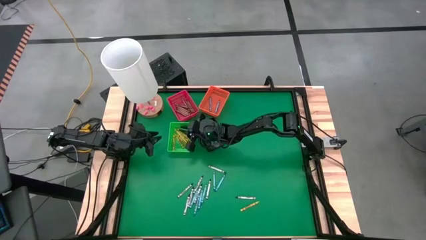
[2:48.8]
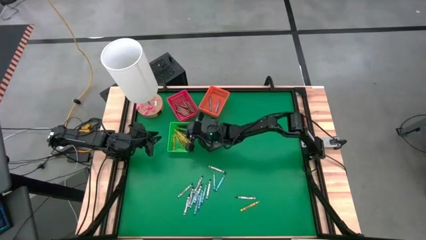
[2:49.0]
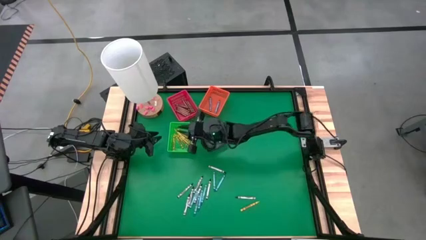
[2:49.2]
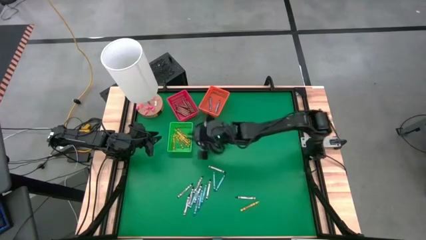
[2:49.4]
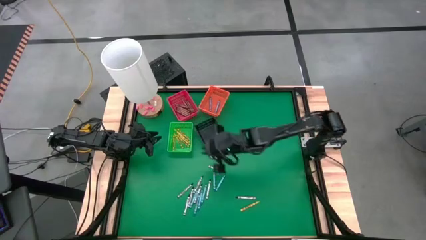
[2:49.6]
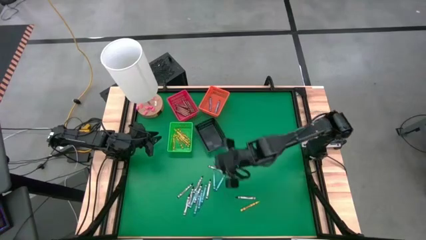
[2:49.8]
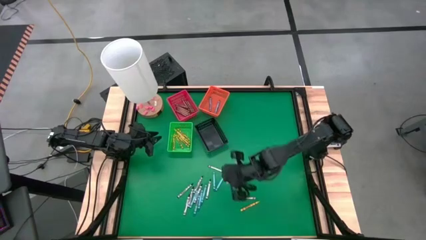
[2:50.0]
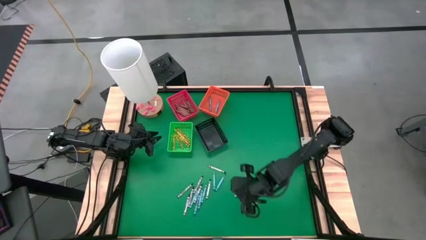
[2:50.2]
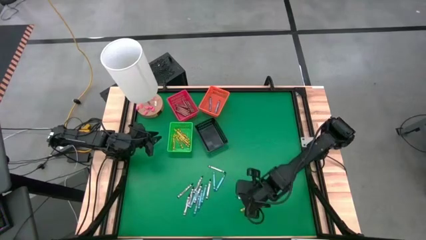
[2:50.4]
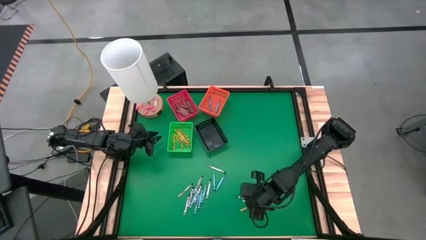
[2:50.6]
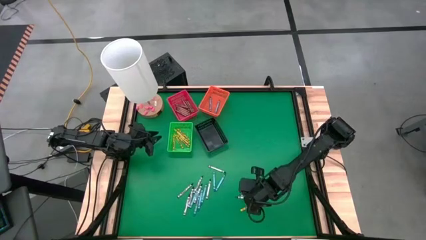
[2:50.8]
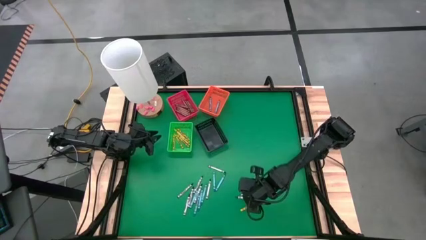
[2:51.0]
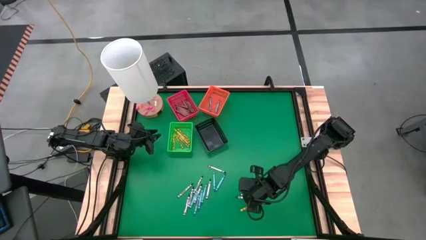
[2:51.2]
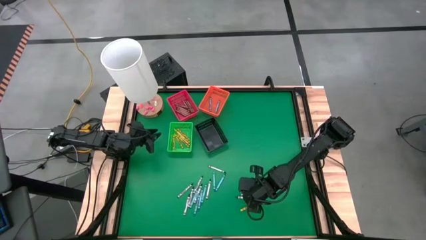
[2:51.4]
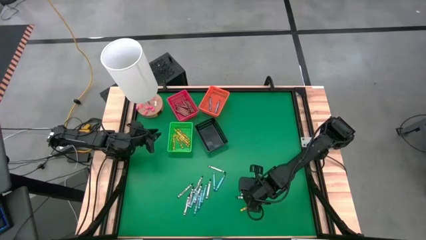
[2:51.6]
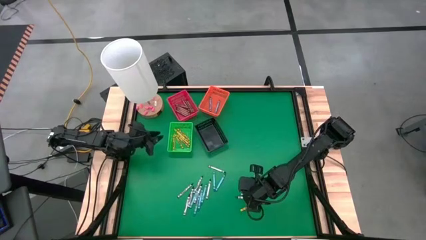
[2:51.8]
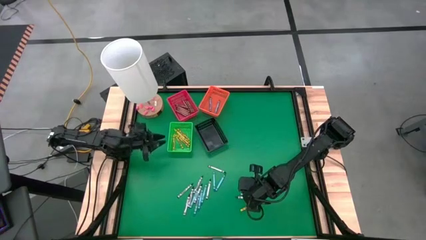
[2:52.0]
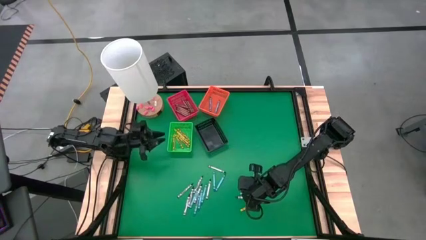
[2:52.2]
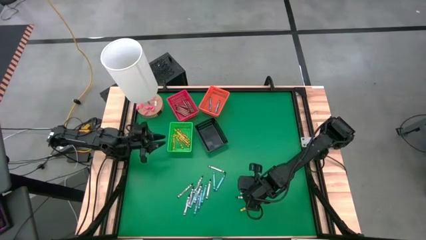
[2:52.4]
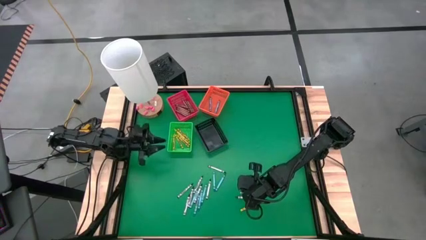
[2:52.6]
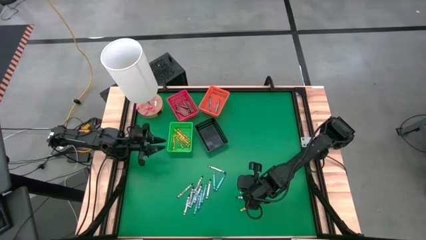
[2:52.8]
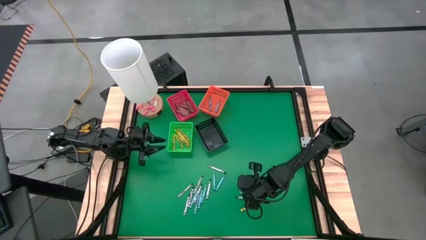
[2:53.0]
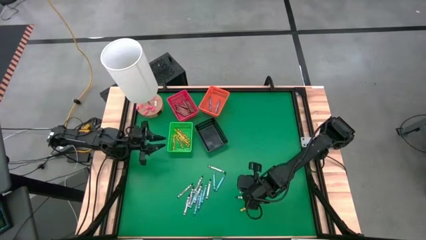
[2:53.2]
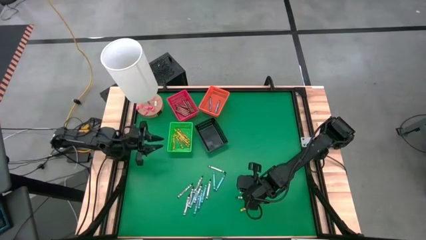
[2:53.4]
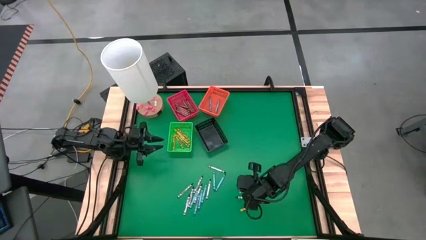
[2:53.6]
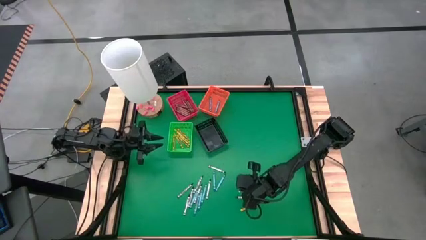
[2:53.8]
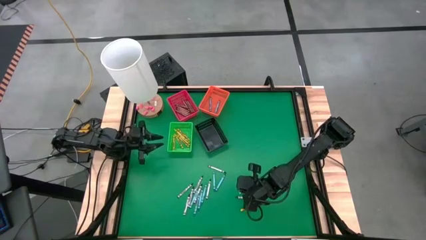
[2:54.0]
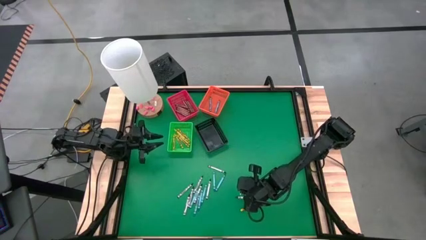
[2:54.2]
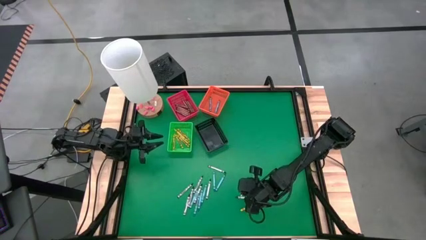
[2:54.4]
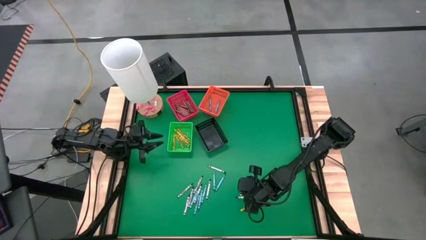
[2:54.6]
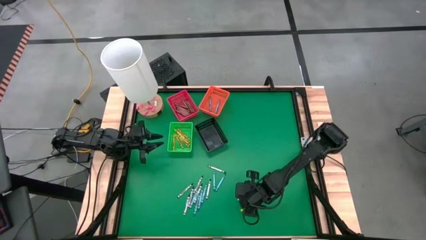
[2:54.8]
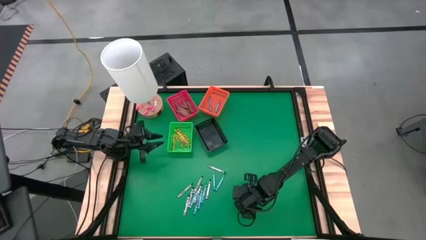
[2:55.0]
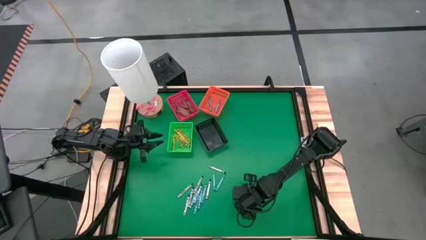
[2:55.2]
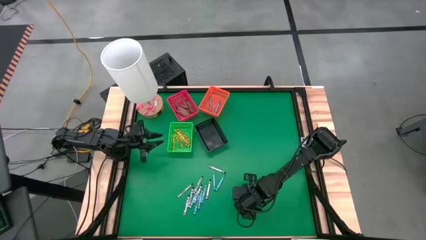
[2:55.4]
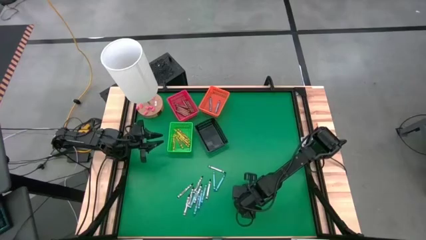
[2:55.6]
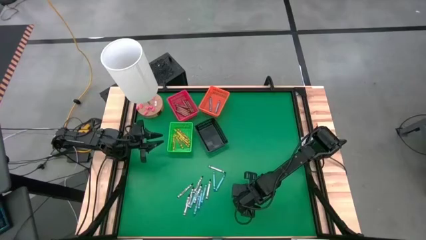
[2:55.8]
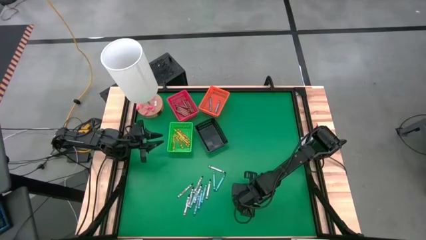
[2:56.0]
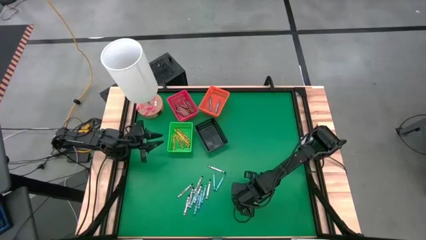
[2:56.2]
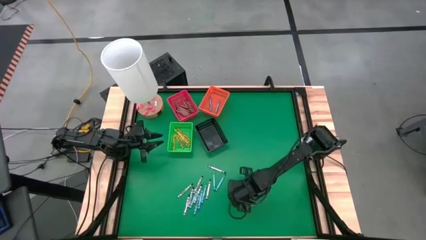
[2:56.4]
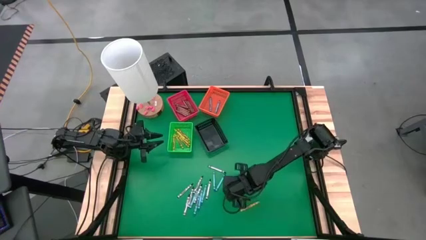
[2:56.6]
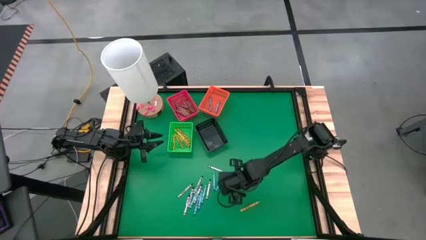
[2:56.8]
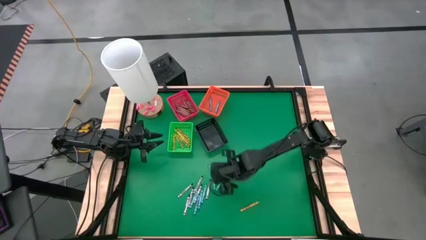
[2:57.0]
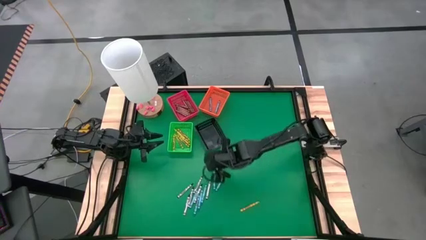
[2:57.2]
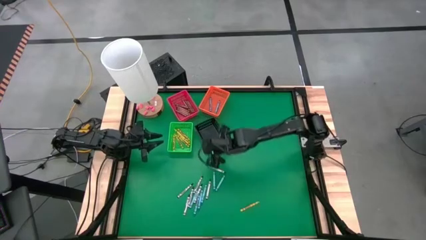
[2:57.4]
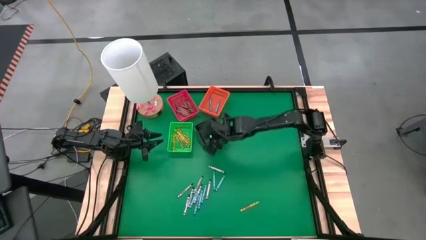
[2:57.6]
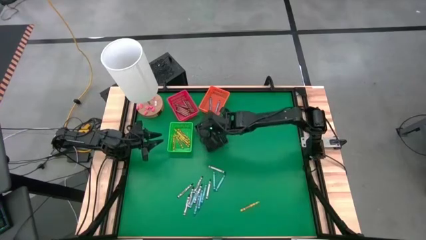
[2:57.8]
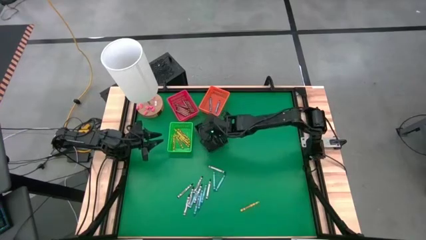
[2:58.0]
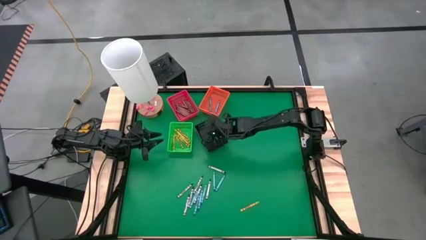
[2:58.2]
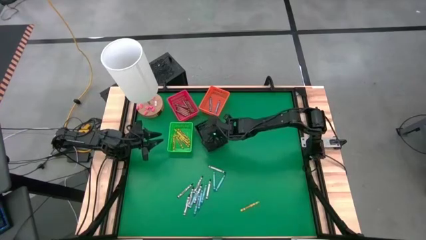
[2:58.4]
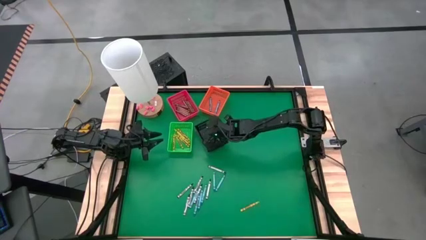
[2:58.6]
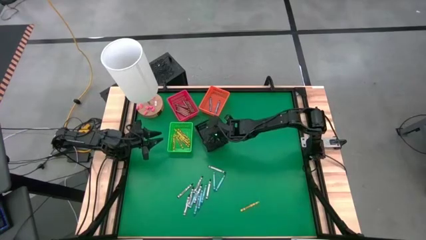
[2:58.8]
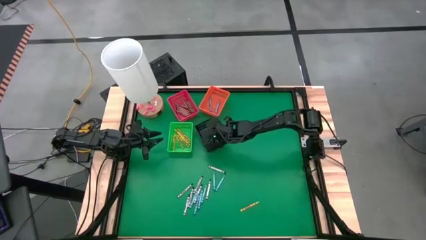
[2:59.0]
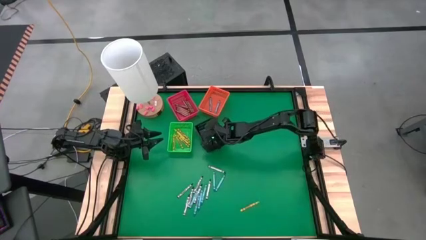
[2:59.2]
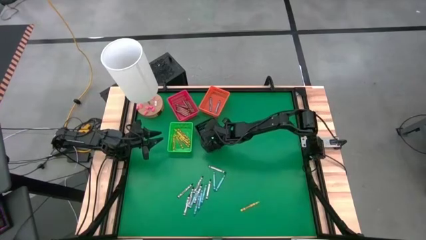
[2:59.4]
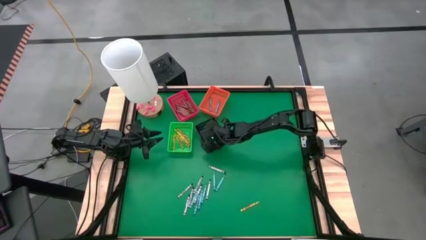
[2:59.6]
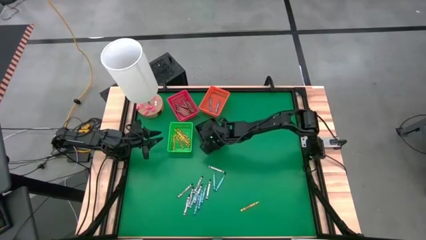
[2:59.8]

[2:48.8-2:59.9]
Task: Sort crayons
Put the black crayon into the black bin

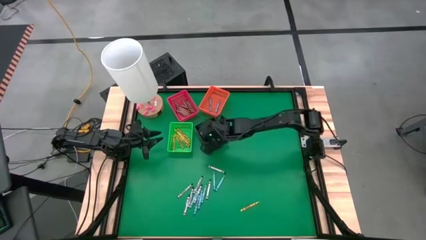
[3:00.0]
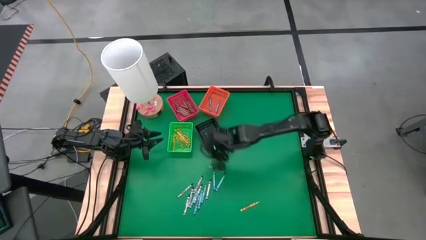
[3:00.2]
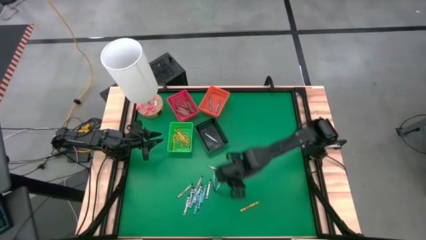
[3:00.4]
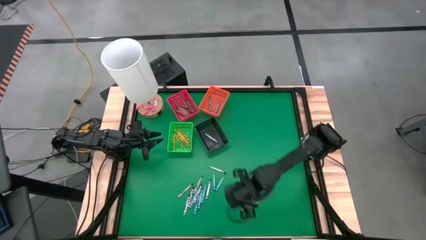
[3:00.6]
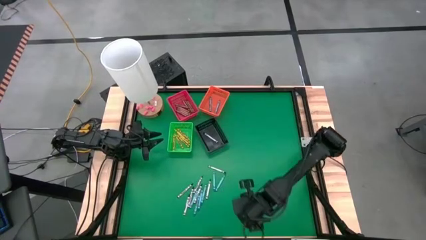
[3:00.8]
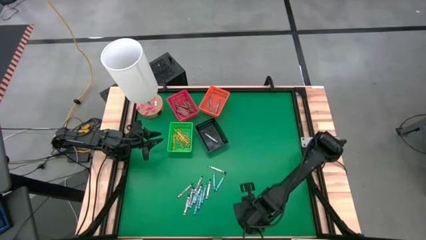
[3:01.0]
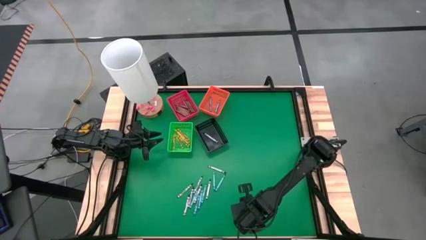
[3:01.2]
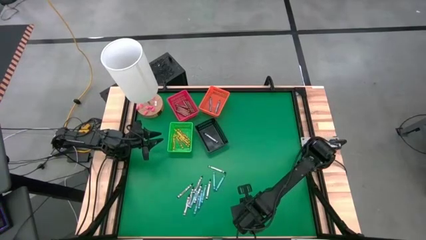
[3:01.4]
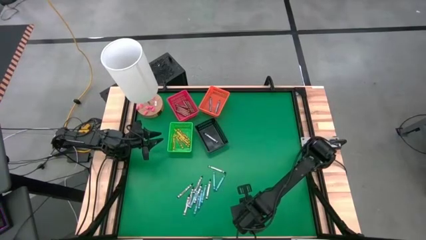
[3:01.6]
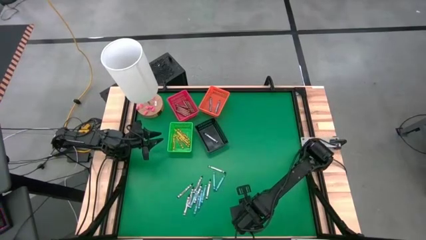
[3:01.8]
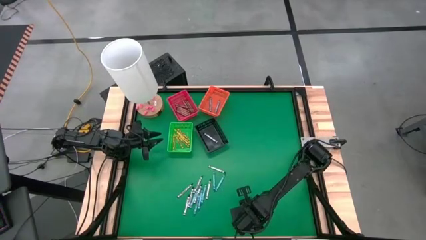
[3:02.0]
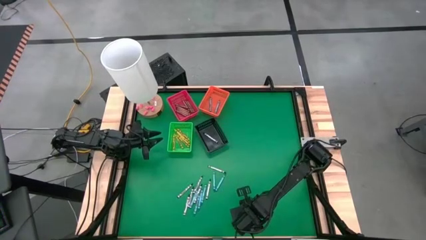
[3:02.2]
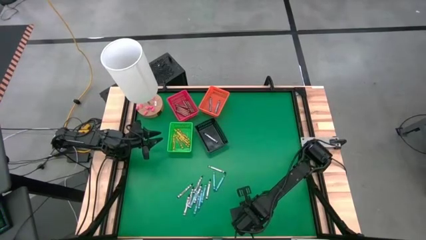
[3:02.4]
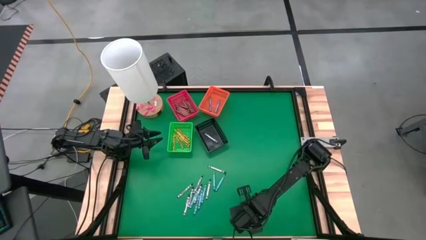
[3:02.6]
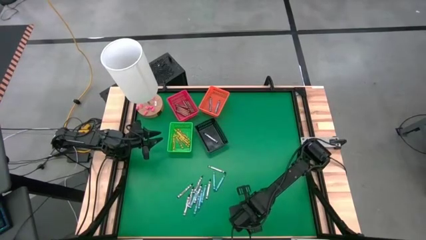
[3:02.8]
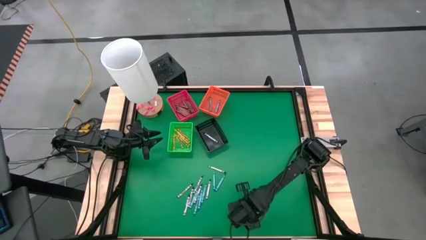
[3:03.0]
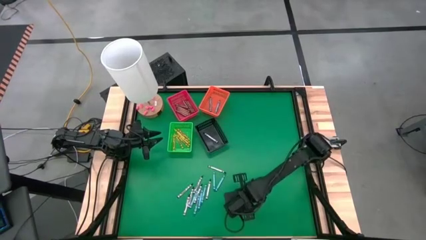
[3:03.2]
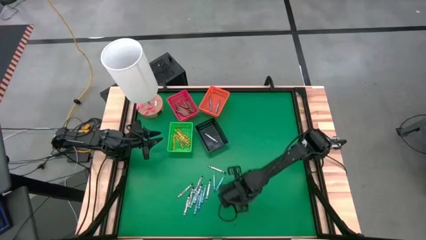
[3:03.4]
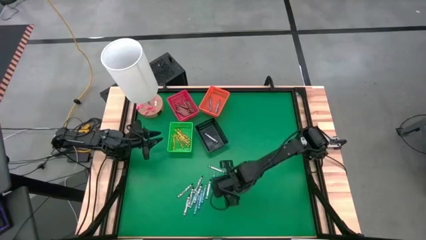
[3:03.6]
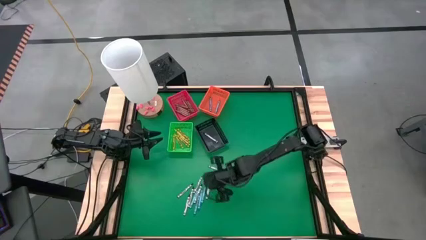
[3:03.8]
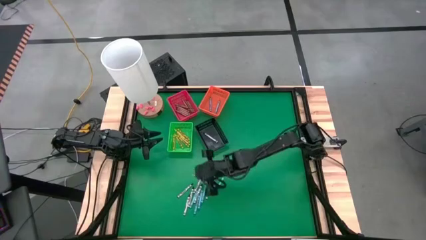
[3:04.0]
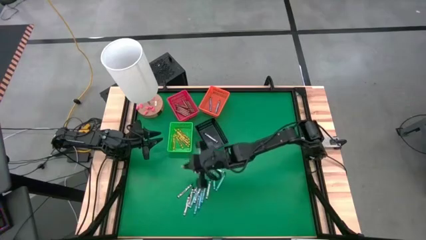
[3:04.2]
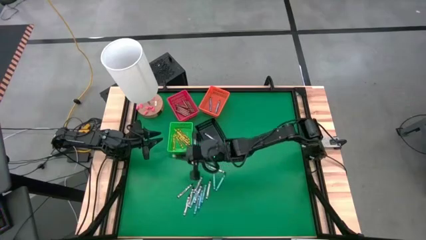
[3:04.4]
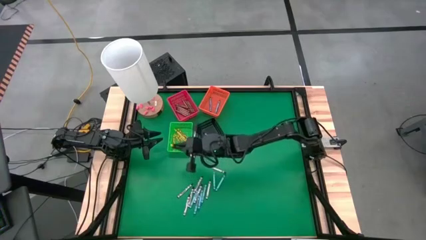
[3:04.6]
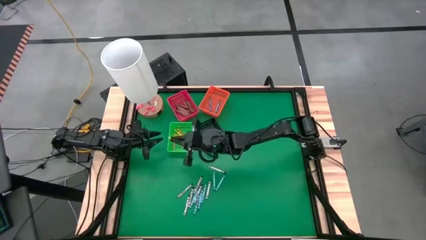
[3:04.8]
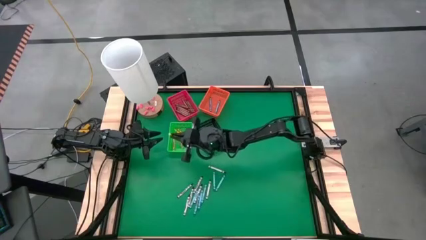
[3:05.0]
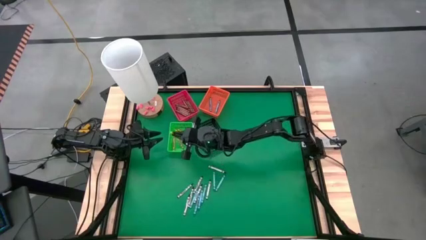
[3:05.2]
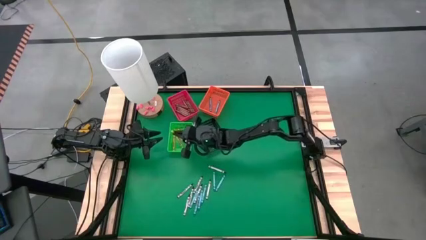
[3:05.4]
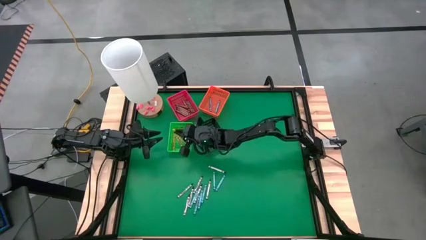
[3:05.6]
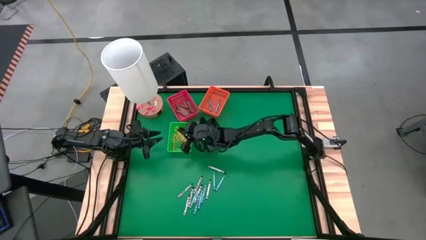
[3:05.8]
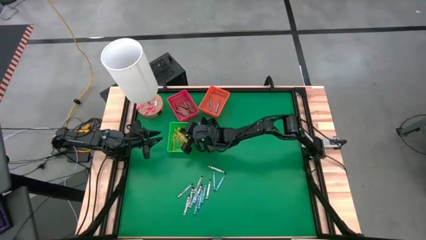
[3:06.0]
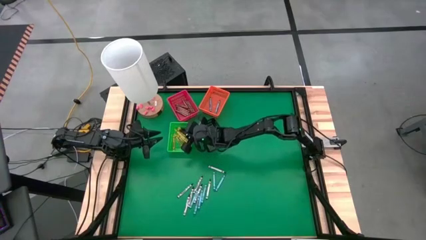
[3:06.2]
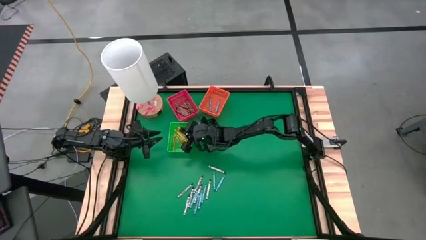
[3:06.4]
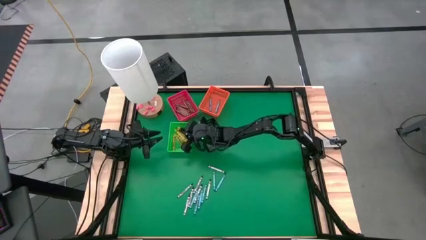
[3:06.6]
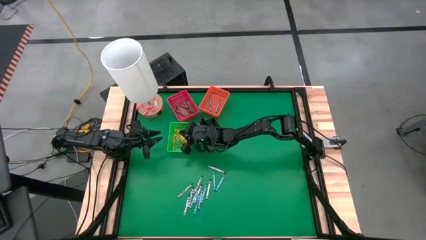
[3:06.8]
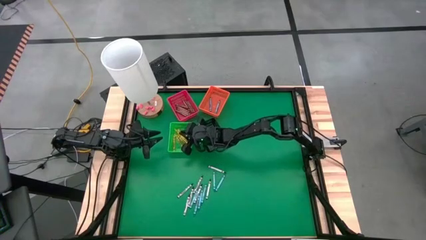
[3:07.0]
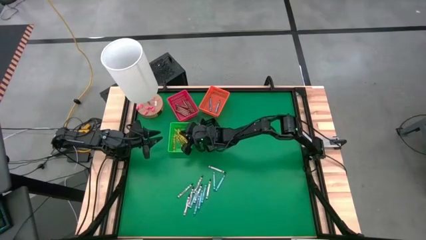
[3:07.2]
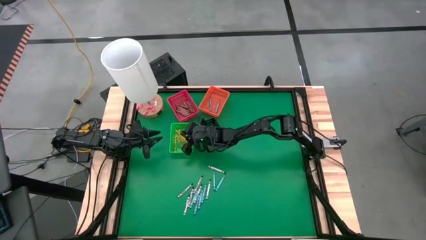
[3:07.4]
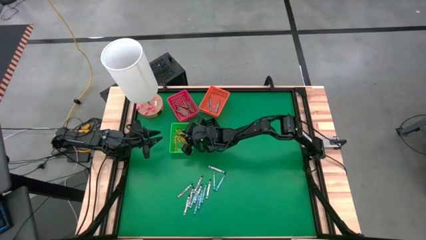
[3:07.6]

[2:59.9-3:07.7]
Put the yellow crayon into the green bin
